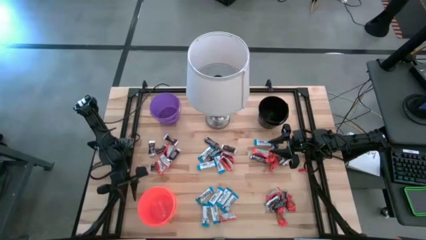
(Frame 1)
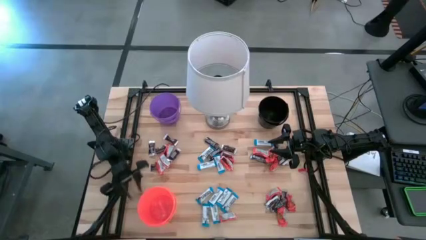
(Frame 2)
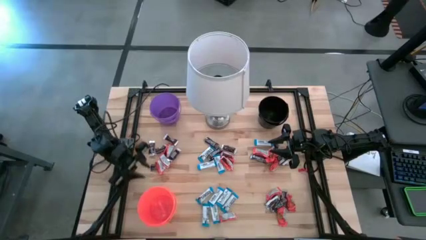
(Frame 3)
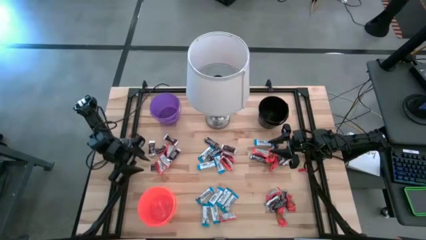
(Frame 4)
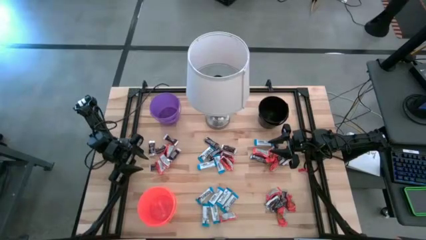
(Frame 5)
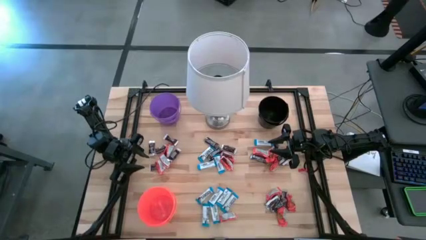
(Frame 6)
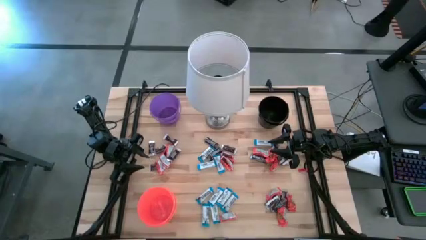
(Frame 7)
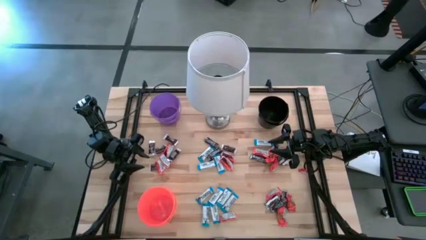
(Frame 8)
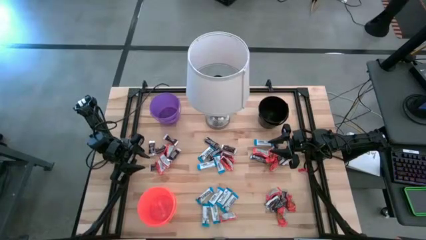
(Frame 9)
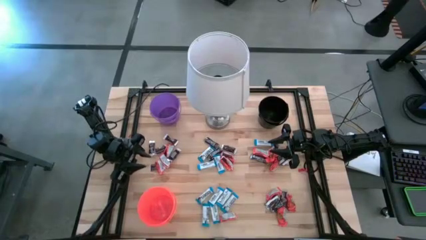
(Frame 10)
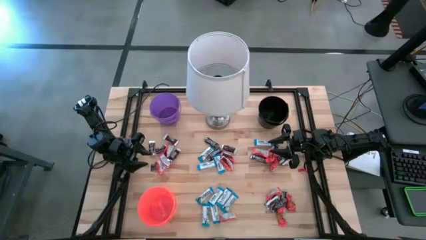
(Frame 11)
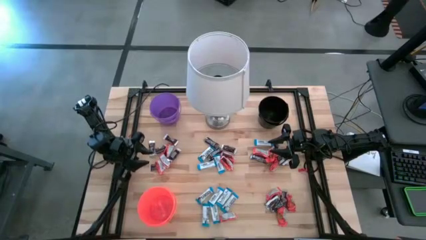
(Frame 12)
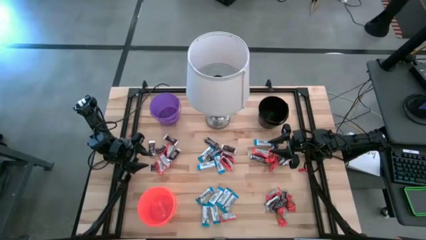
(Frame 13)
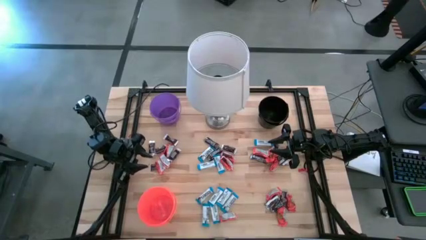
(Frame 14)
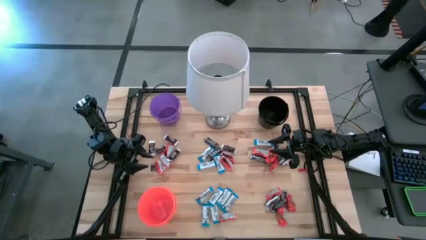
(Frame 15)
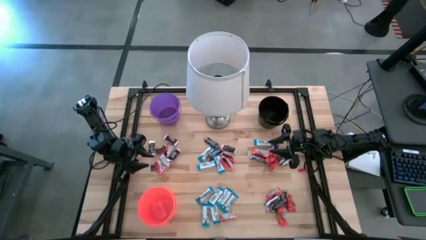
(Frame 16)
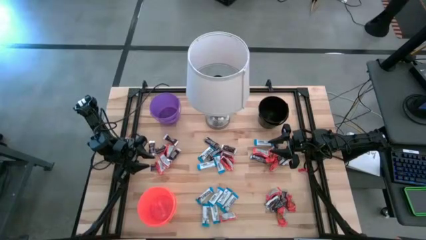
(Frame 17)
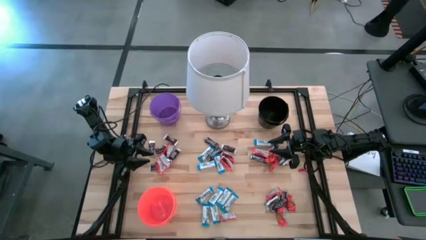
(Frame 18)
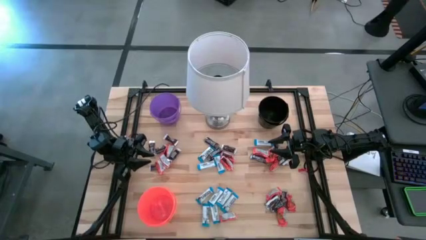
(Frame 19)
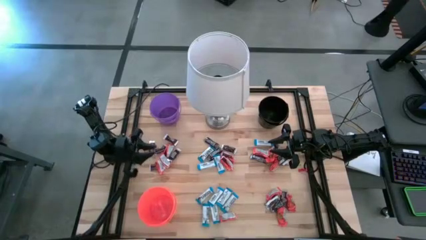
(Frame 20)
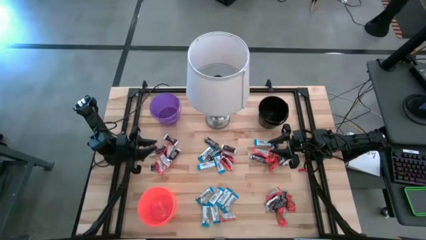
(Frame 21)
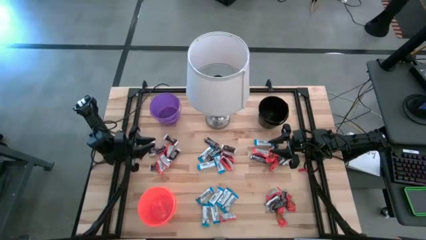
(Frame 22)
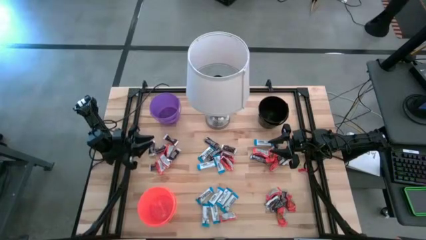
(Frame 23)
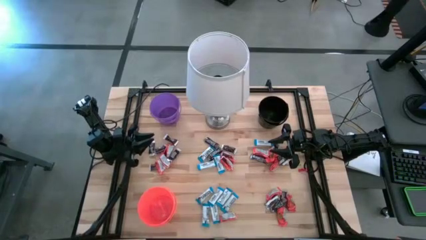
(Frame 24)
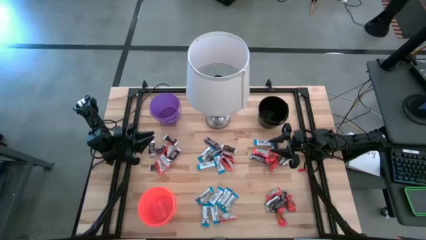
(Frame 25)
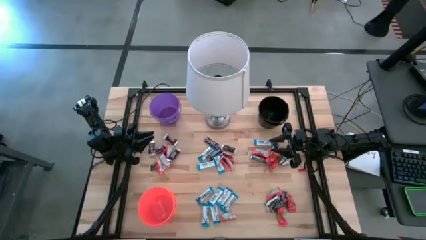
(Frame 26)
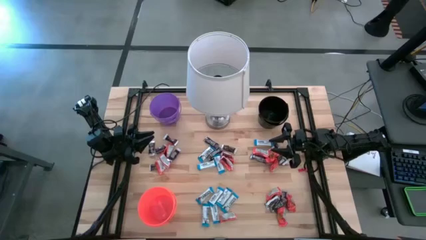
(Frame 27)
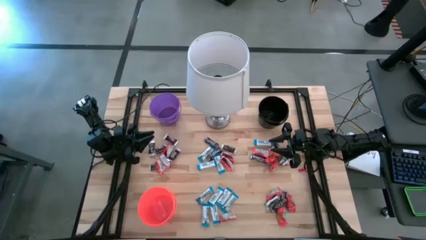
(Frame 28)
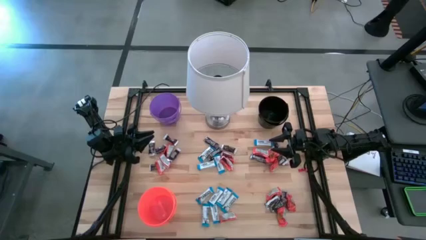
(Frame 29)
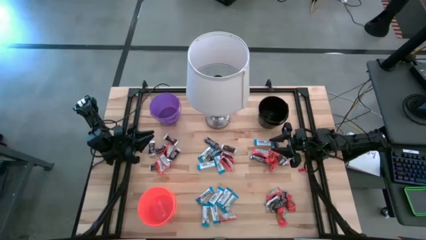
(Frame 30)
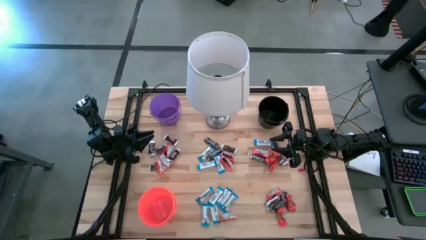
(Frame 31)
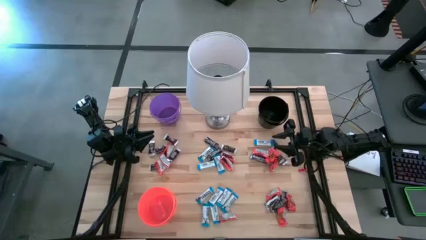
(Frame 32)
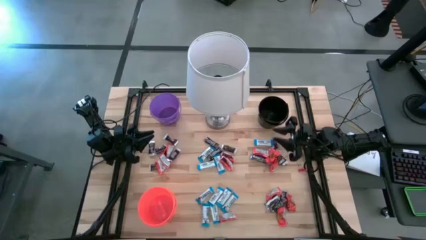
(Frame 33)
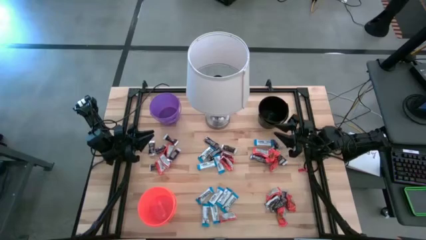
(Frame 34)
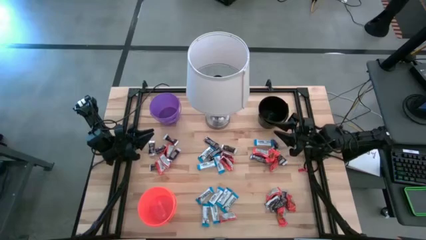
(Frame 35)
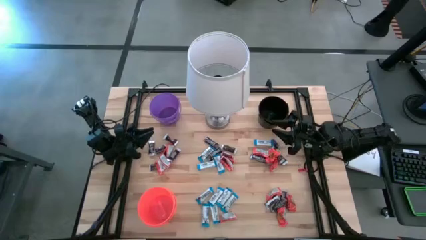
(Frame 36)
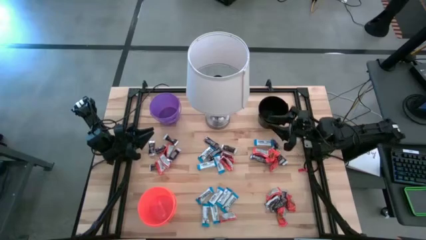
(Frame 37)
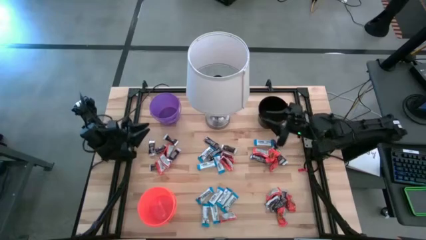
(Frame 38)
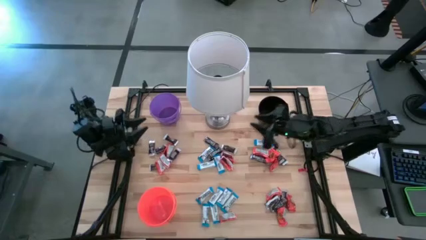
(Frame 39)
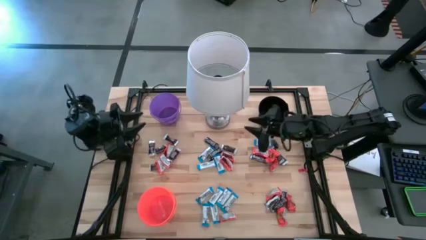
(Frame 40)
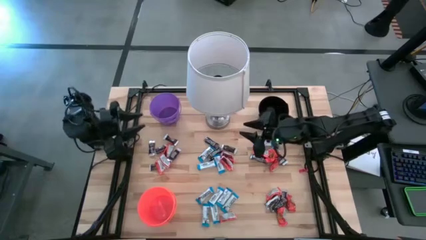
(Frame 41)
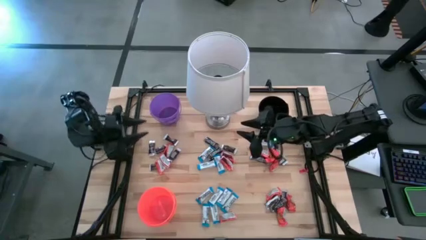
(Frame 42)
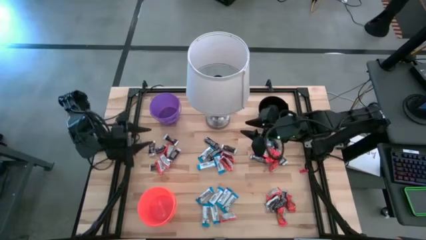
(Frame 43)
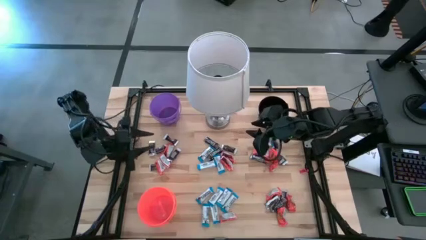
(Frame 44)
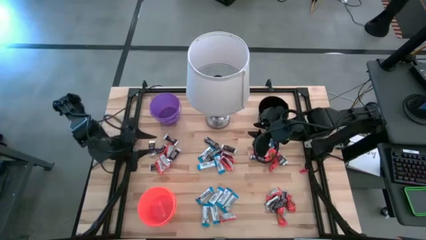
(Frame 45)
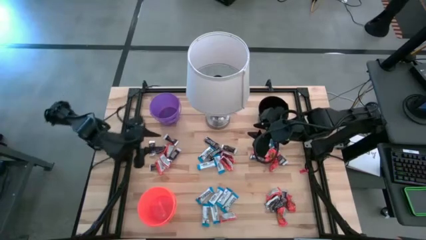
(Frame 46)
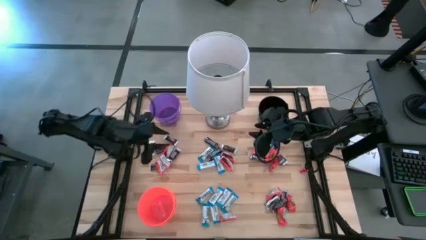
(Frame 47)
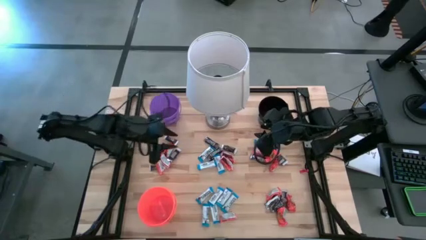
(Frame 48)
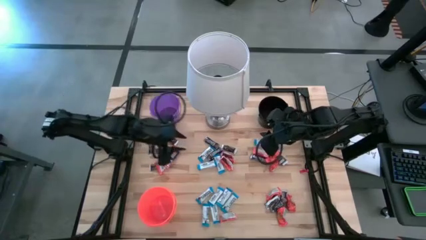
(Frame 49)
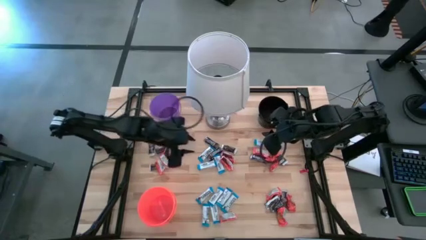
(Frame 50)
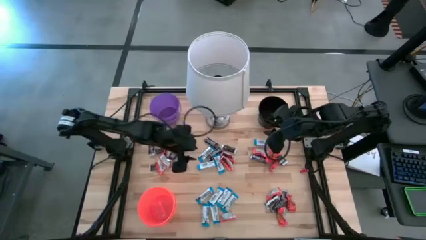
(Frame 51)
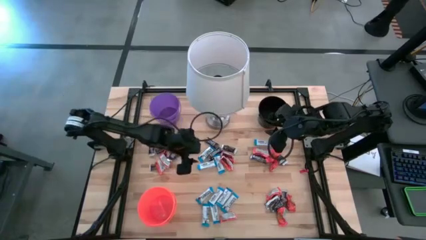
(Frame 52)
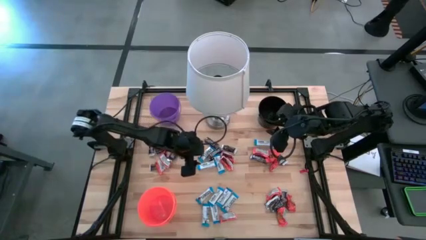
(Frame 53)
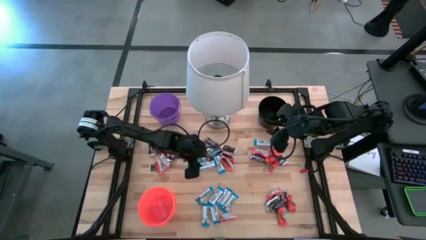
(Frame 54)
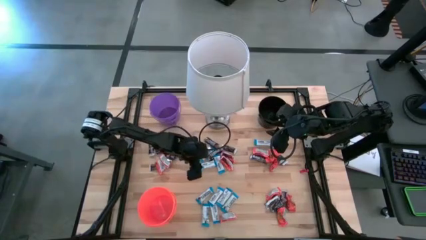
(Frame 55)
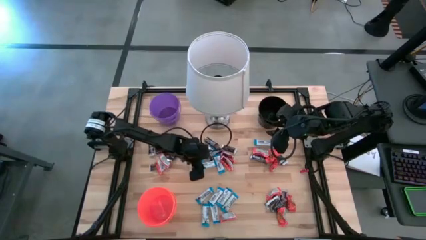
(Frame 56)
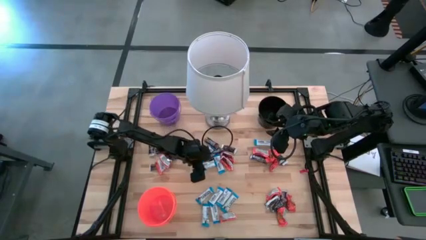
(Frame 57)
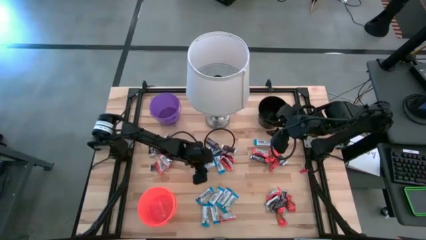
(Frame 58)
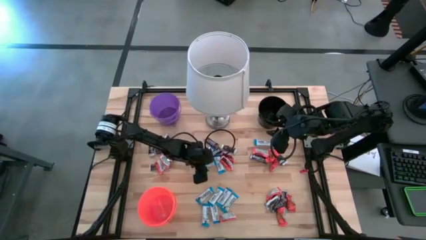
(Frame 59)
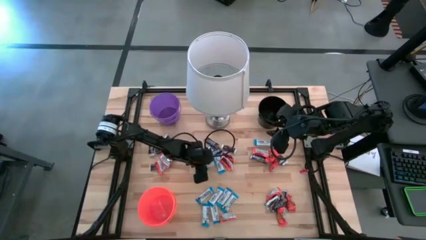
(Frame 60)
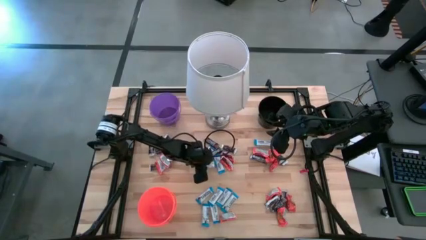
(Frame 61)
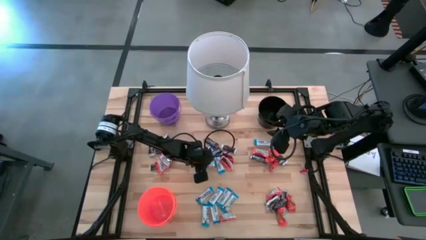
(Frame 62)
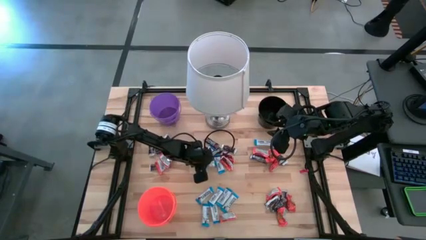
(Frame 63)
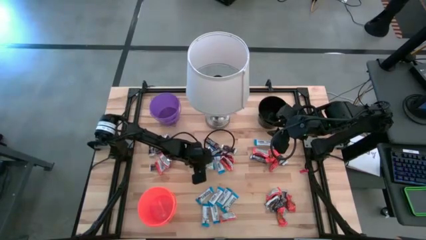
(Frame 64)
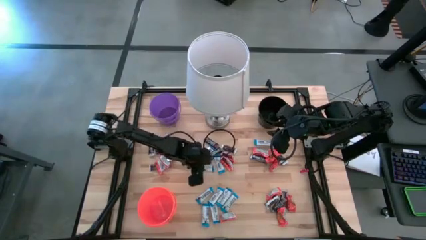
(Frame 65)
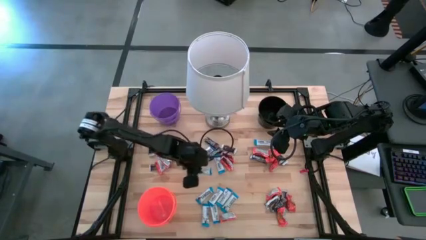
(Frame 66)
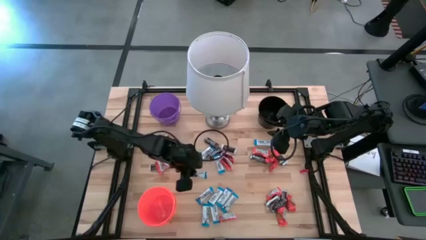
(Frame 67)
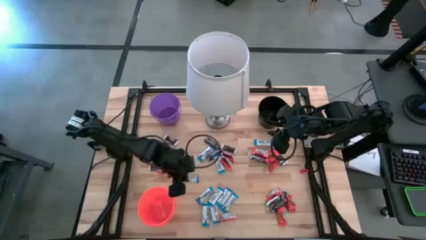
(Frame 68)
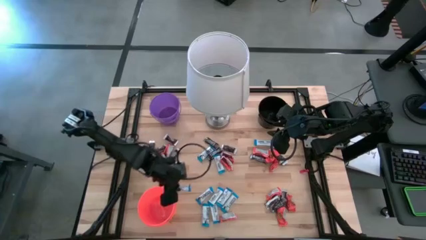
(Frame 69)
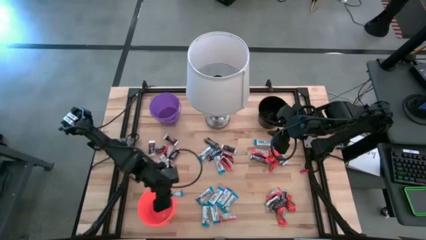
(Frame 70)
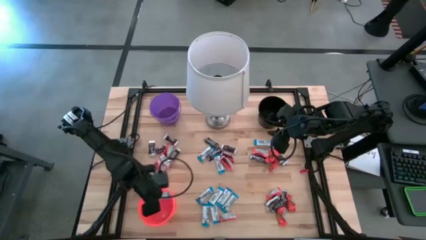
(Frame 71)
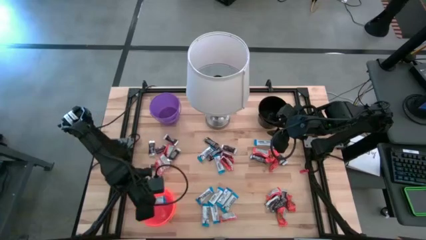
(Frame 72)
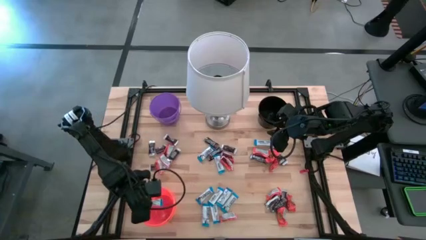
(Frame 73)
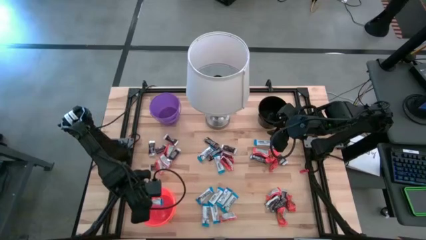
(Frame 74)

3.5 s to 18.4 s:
Task: Organize candy in baskets
Put the white chocolate bar into the orange bucket

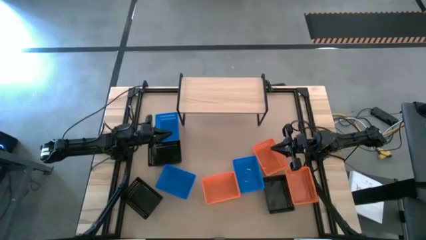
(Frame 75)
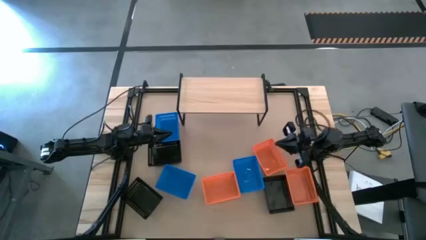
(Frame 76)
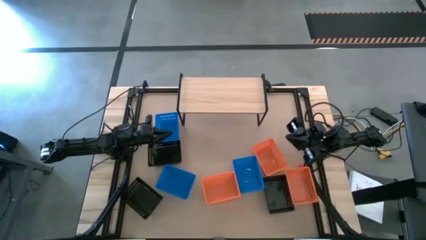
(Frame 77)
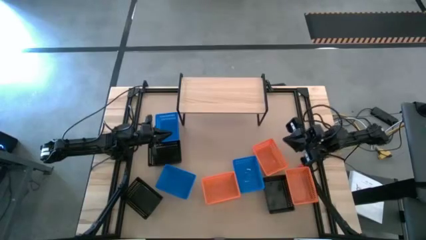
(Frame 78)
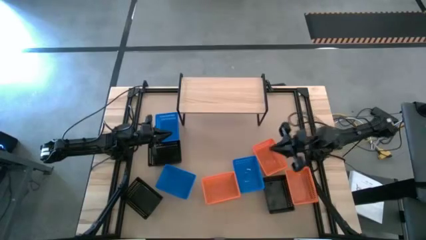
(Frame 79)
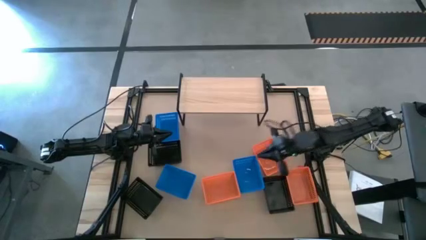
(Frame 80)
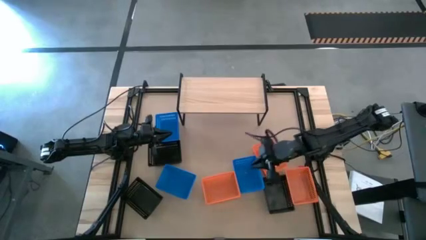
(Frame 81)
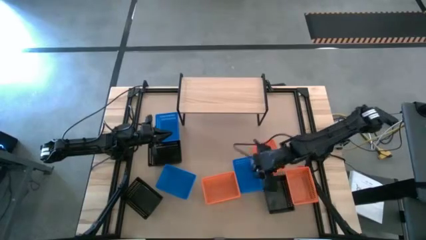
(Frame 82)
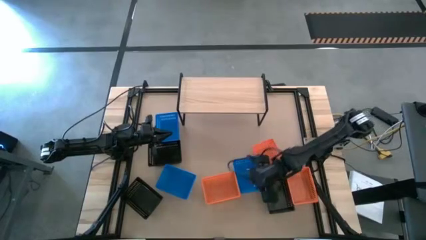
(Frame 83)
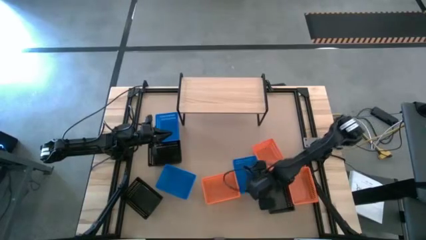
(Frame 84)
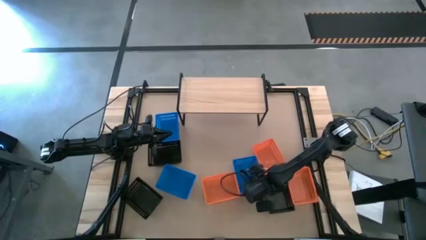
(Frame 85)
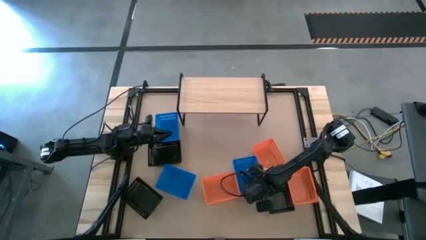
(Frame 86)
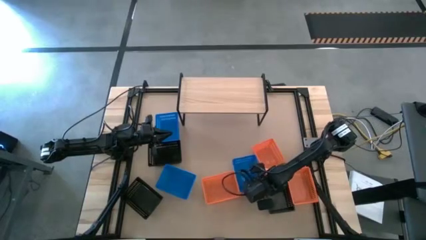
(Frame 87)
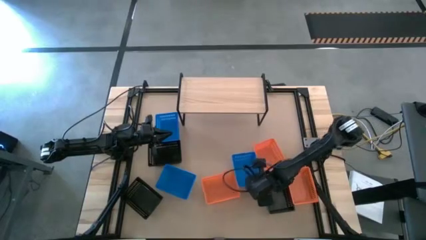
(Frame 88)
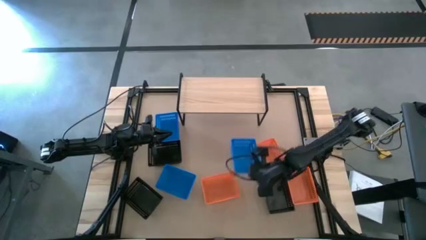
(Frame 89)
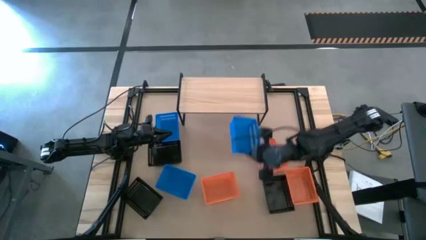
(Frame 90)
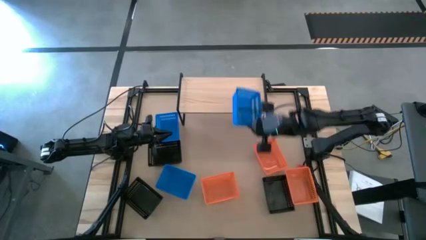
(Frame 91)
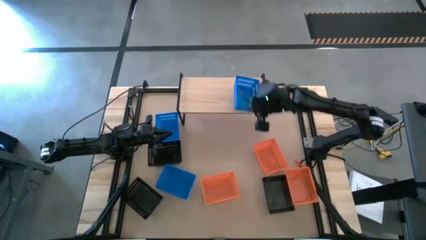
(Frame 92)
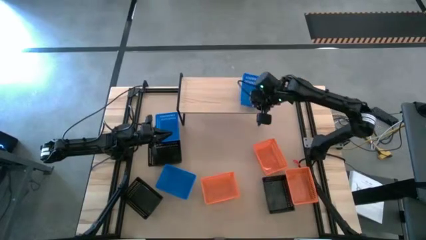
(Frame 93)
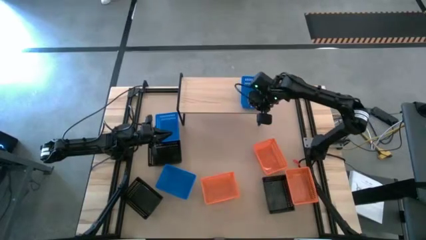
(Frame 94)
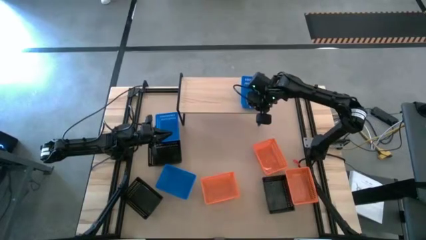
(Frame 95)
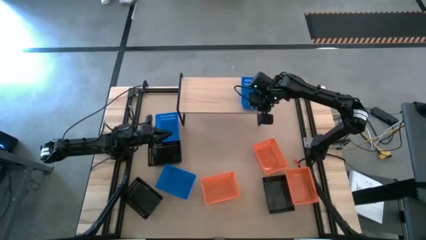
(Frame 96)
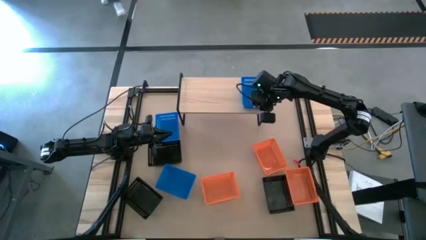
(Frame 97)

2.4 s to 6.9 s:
Task: Stack baskets on shelf by color
Put the bottom right blue basket on the shelf
